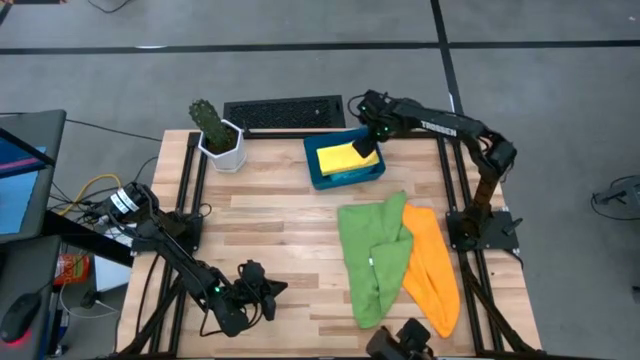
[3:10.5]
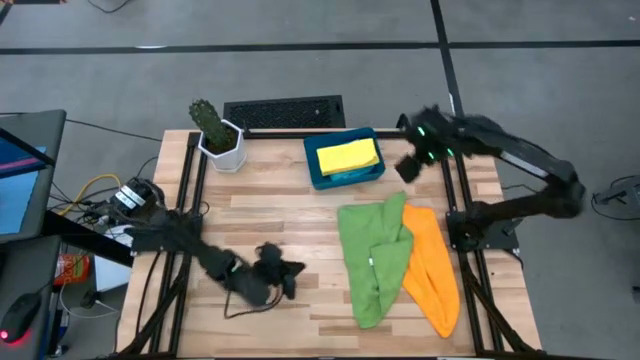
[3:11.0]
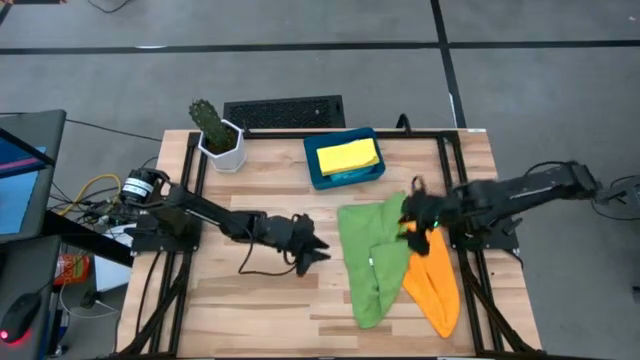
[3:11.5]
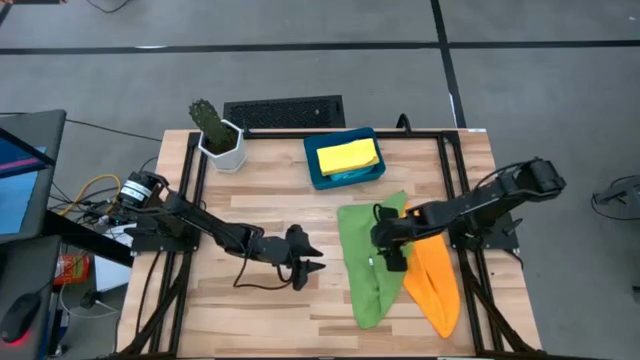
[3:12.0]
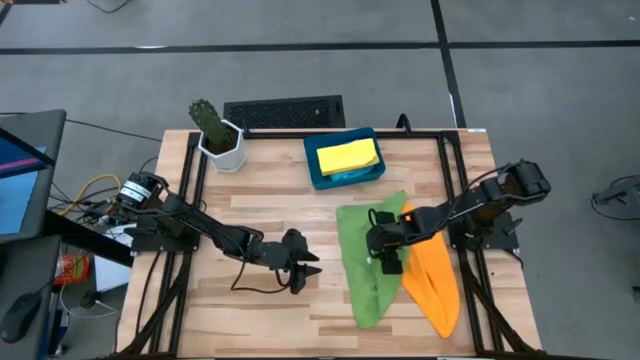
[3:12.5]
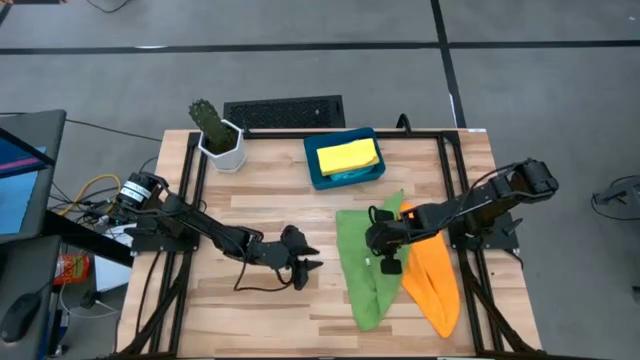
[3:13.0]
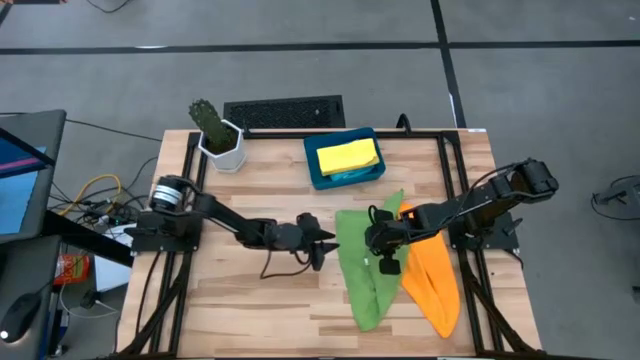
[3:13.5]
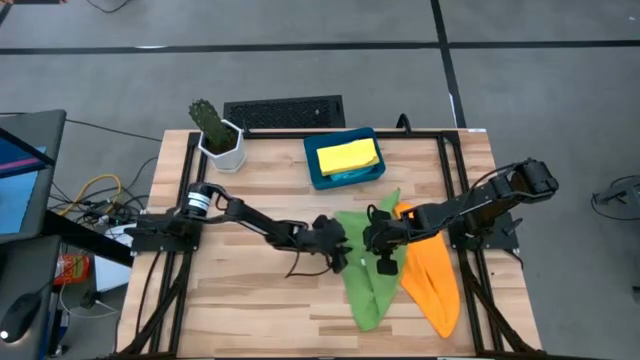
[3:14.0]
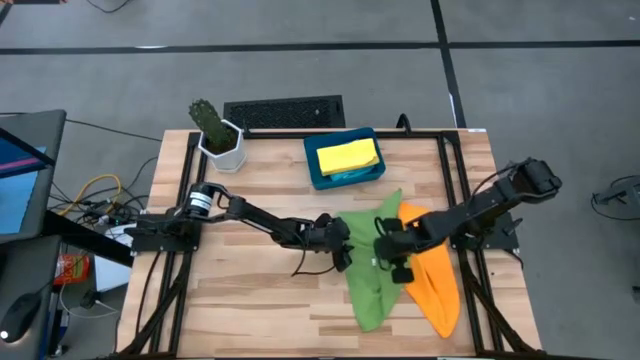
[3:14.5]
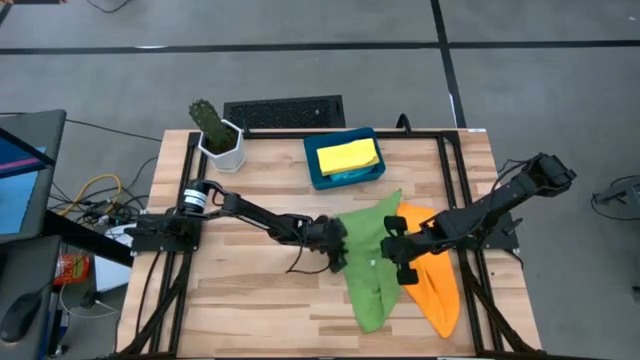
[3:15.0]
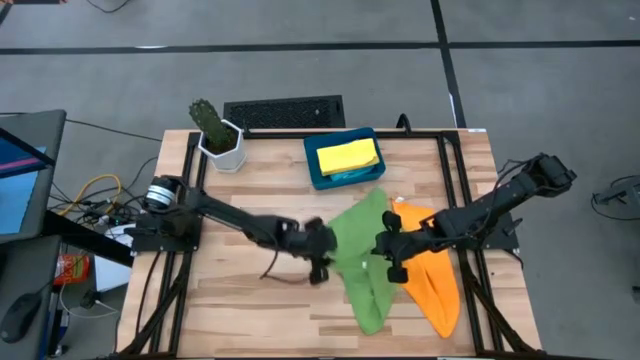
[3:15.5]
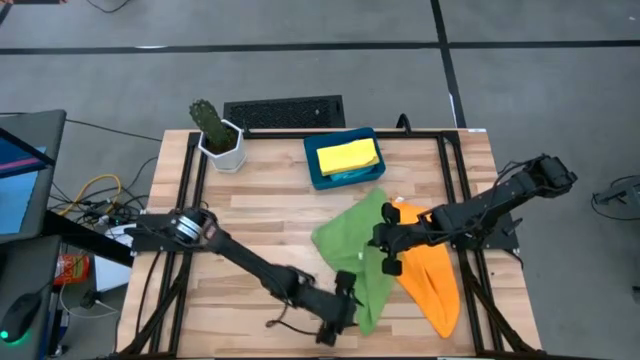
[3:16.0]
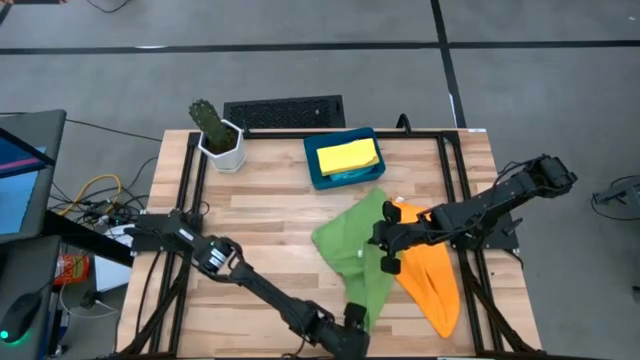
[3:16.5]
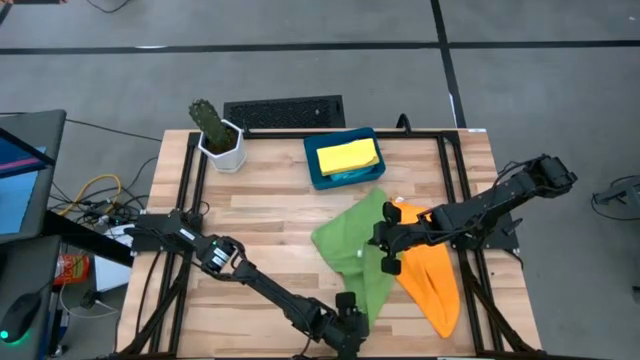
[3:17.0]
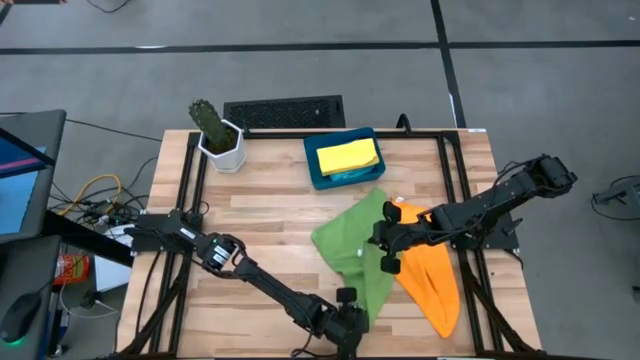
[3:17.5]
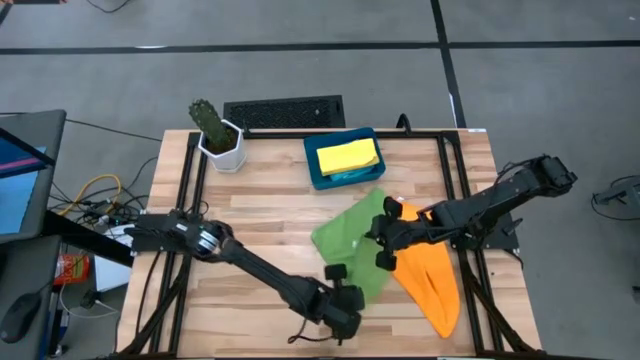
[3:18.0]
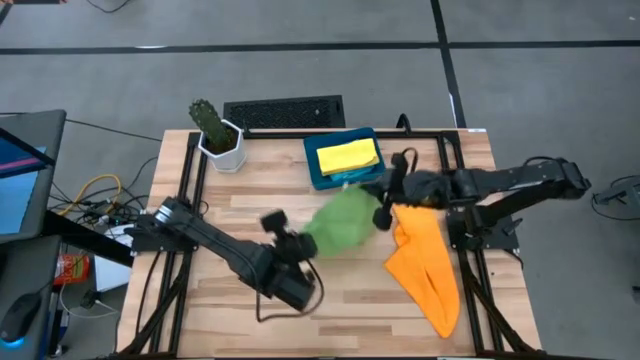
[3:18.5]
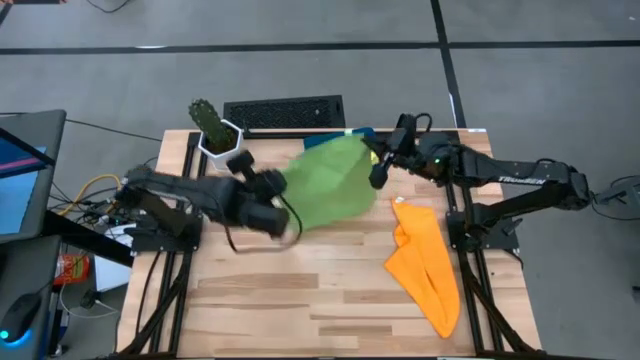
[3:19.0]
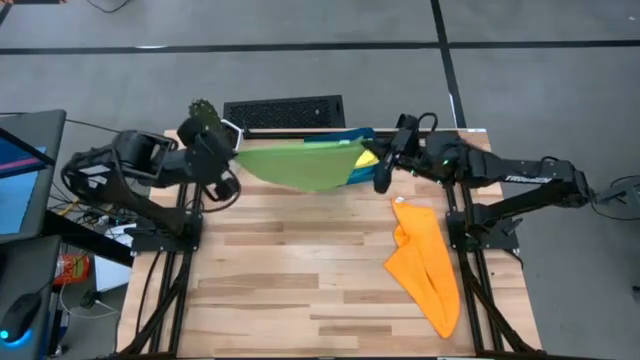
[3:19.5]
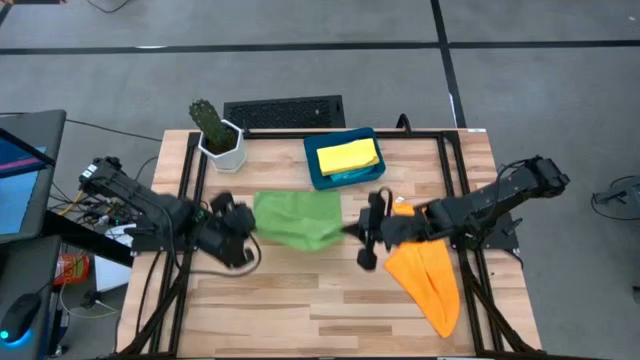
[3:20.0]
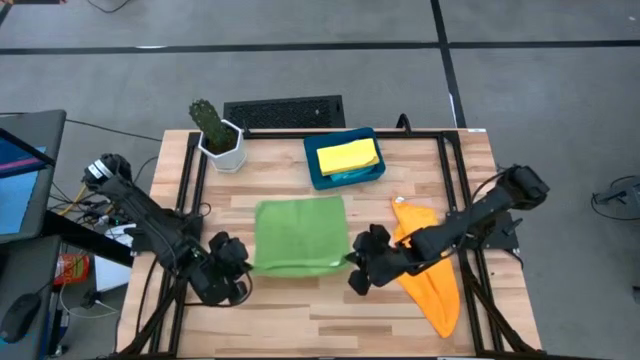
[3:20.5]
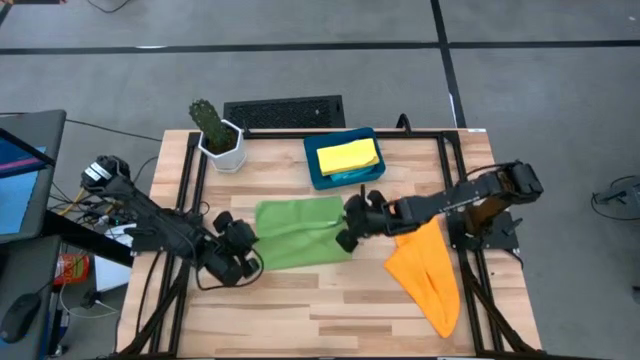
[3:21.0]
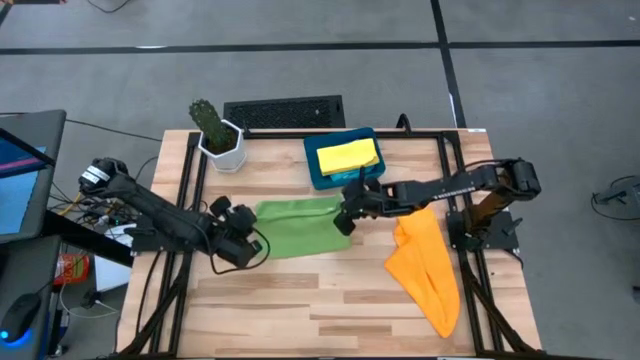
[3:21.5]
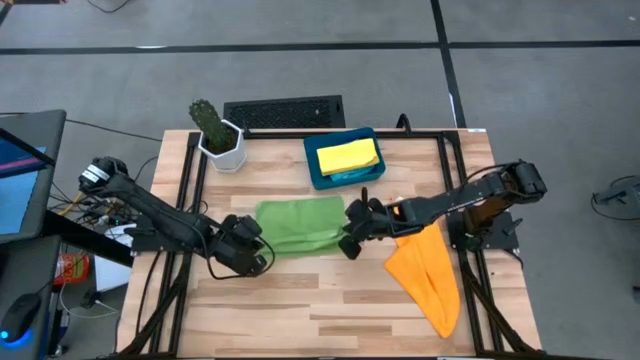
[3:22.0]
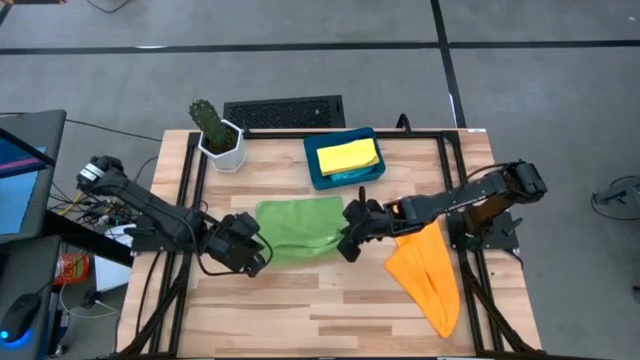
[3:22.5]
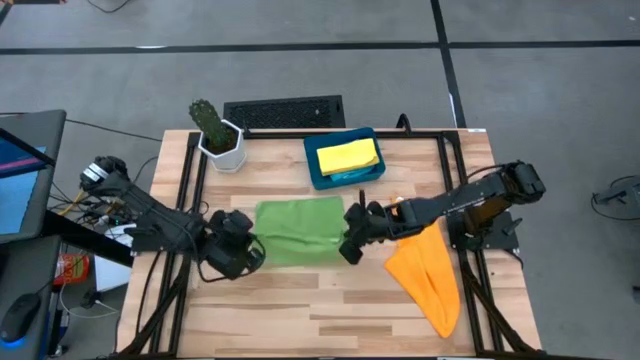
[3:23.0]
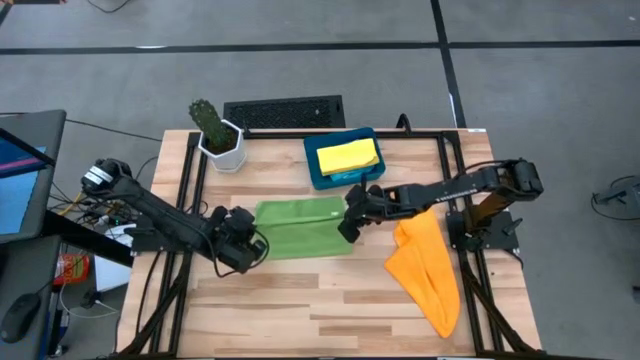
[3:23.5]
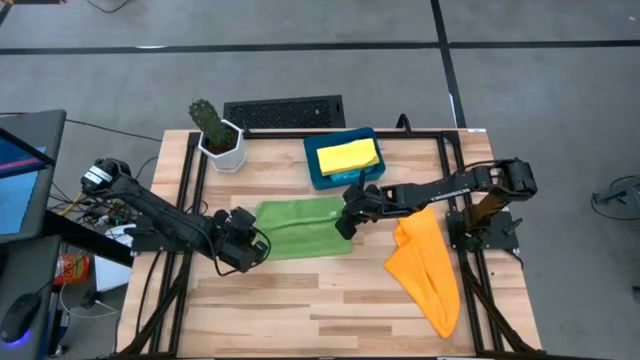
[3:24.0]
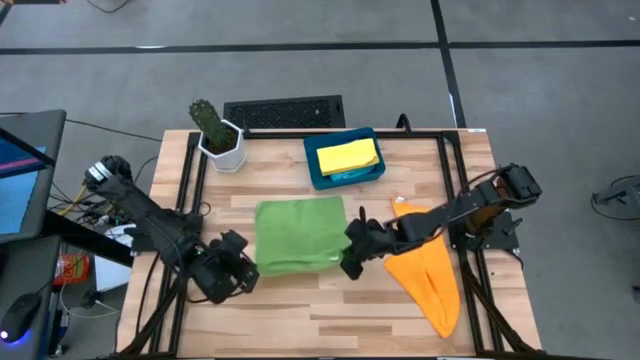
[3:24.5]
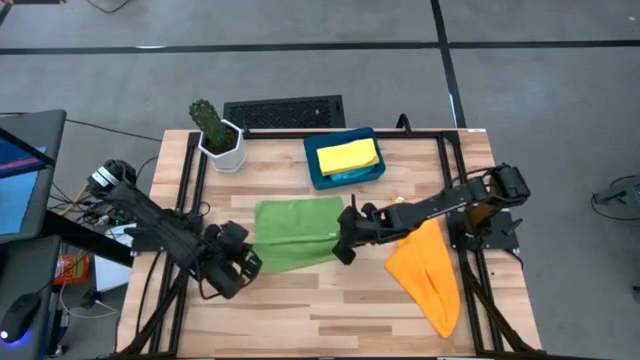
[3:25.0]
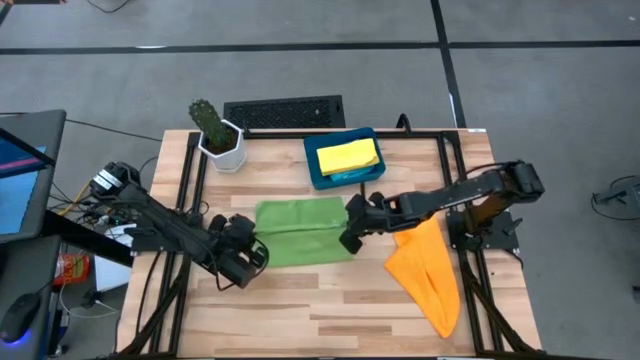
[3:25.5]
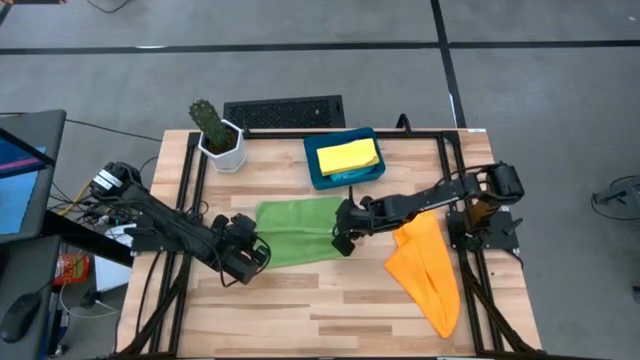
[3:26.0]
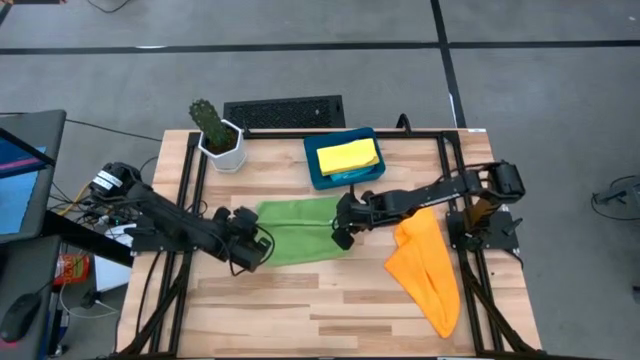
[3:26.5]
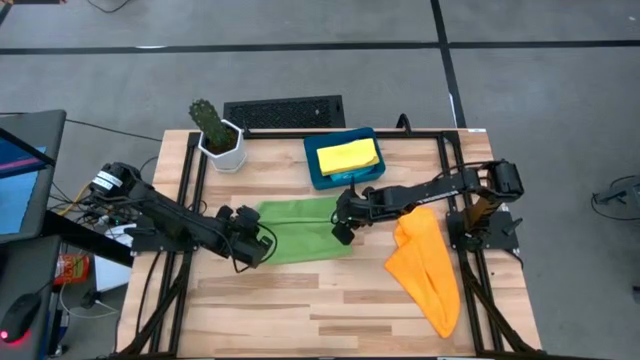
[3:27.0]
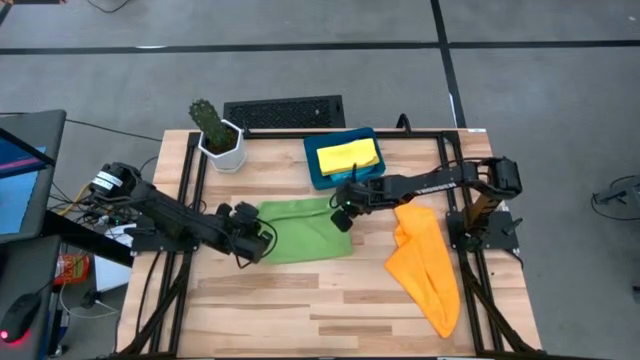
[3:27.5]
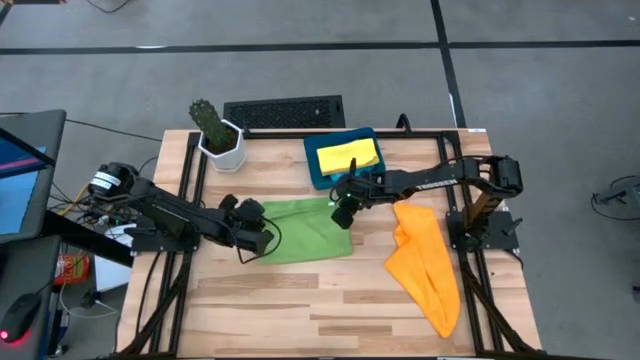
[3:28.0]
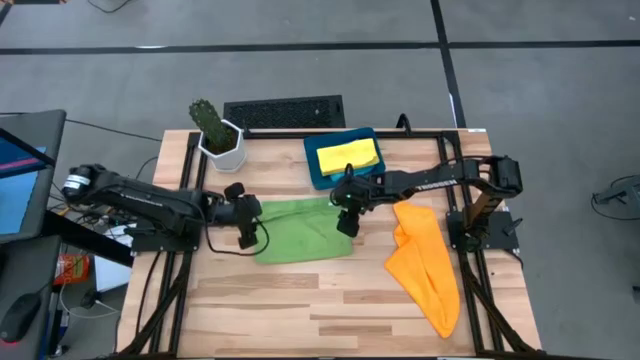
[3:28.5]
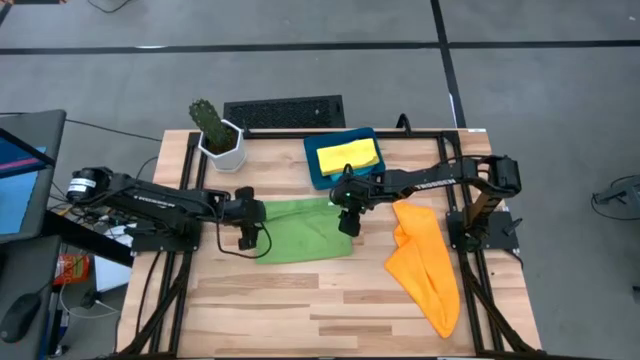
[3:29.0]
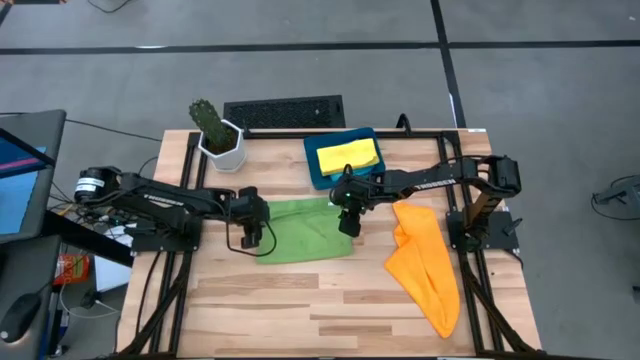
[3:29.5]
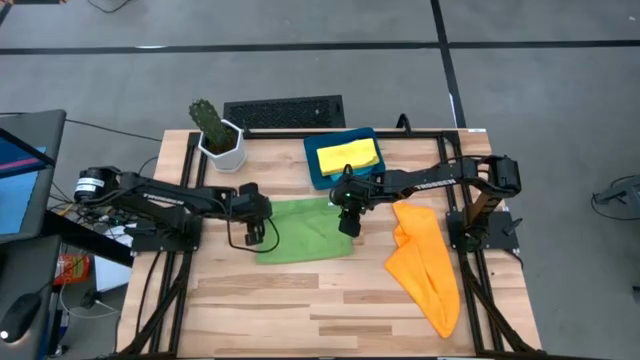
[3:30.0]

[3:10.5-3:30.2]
Task: Fold microfiber towels
Fold the green microfiber cloth
